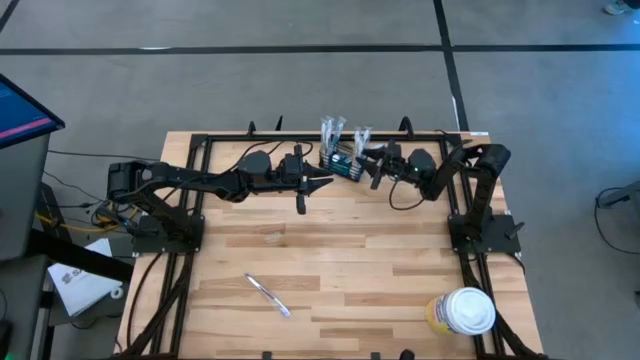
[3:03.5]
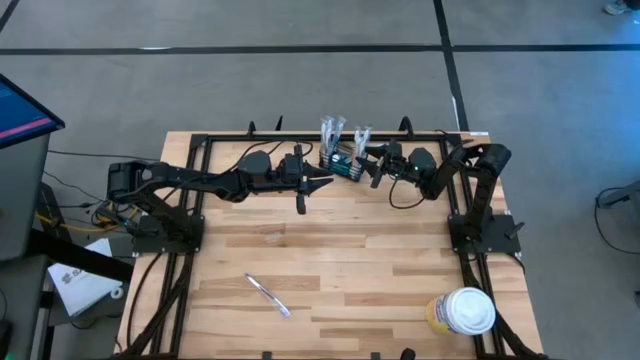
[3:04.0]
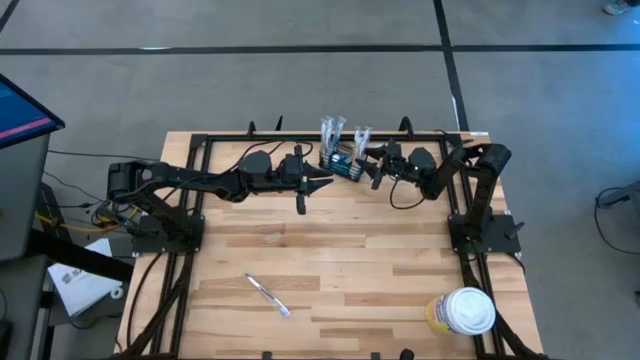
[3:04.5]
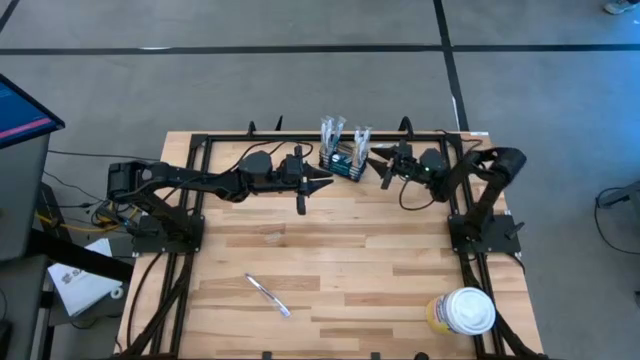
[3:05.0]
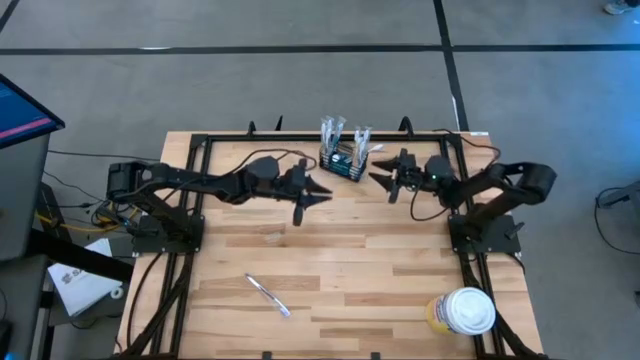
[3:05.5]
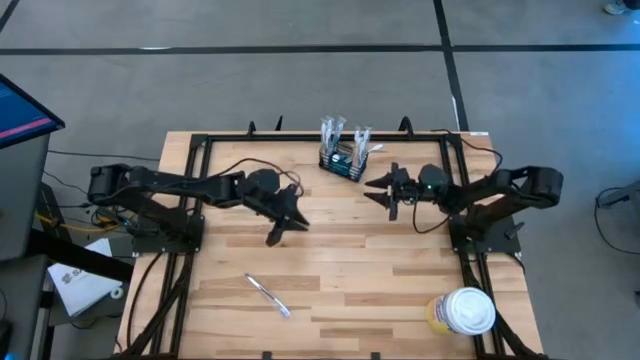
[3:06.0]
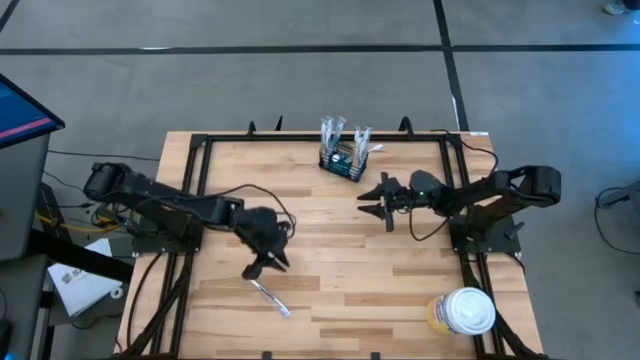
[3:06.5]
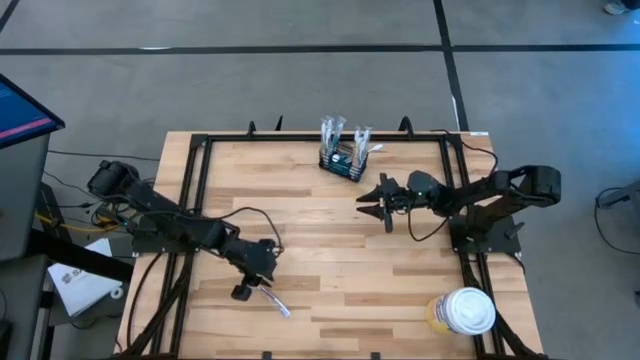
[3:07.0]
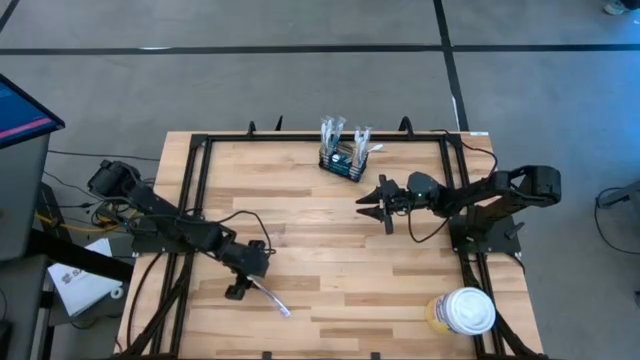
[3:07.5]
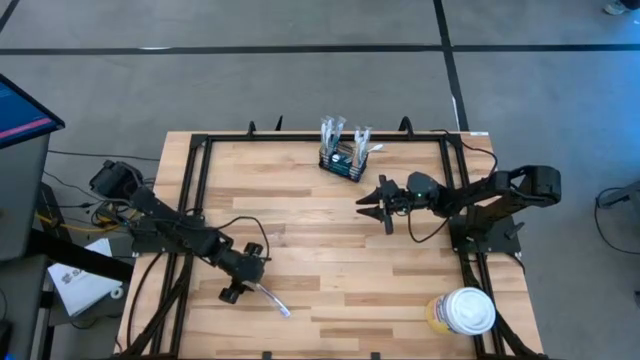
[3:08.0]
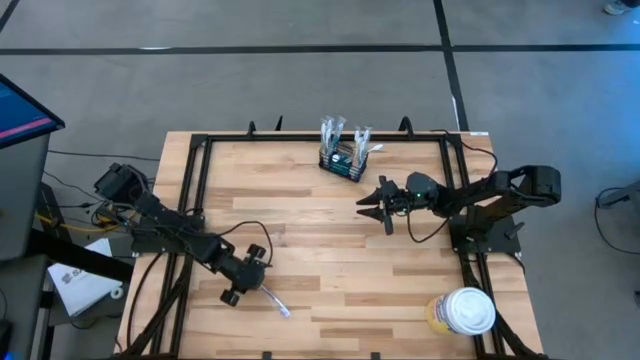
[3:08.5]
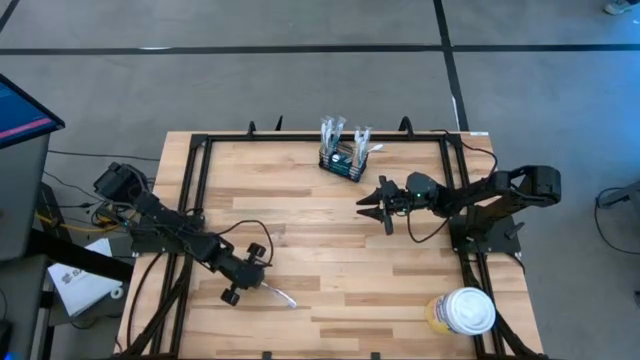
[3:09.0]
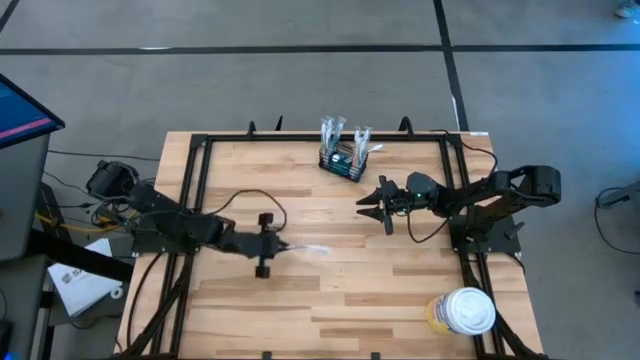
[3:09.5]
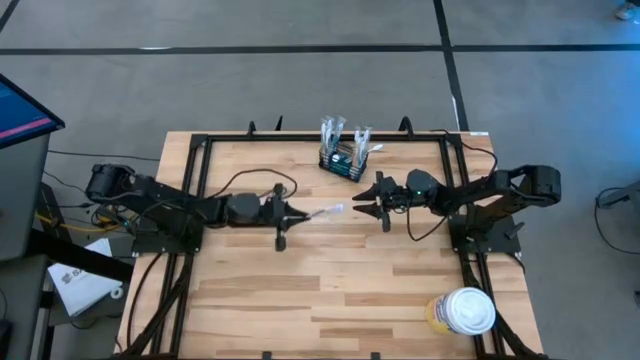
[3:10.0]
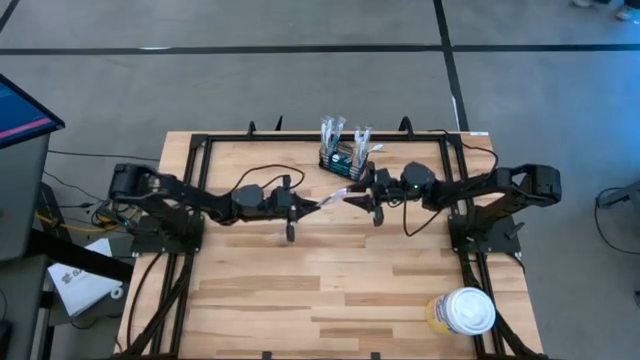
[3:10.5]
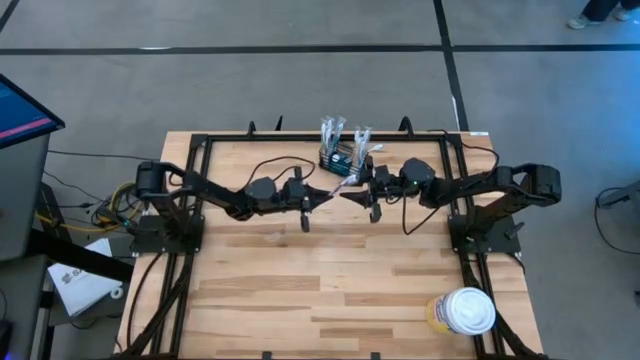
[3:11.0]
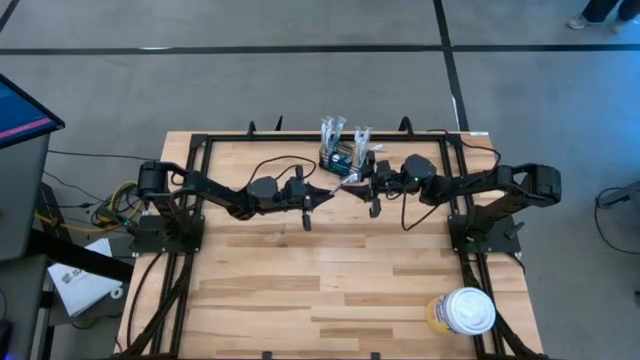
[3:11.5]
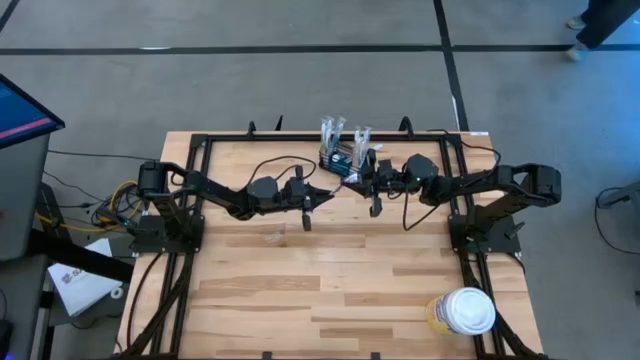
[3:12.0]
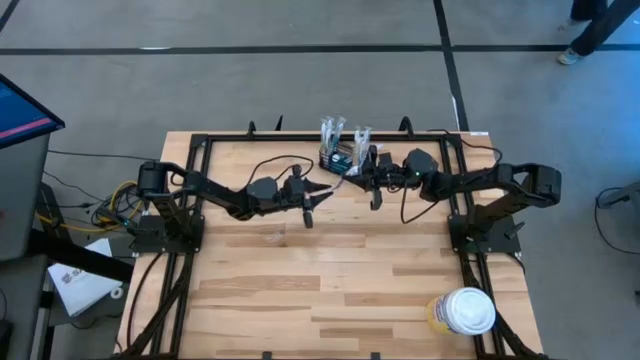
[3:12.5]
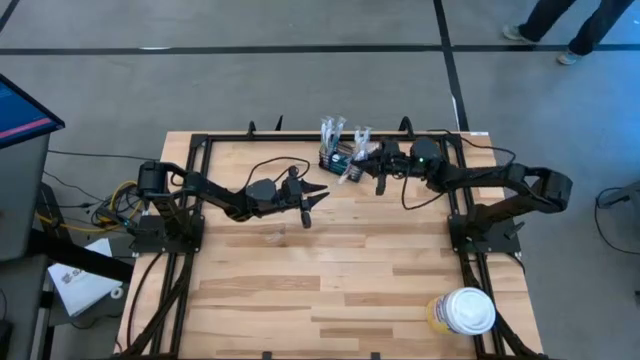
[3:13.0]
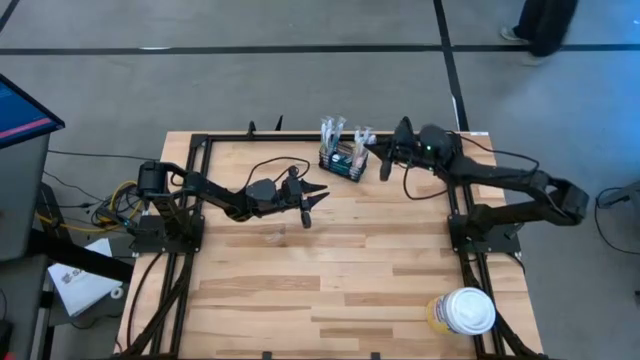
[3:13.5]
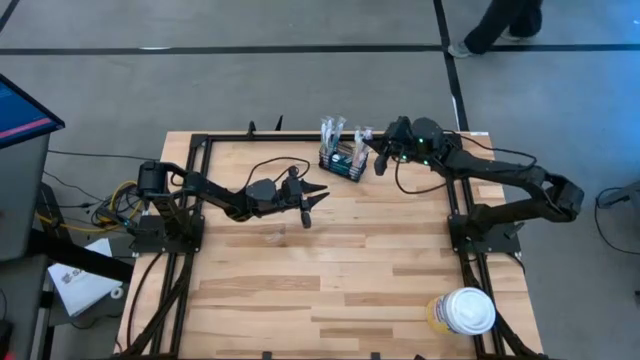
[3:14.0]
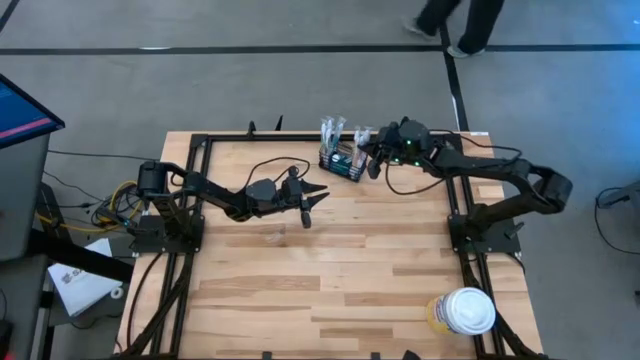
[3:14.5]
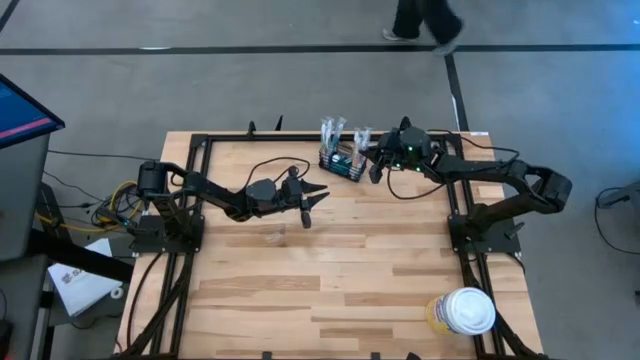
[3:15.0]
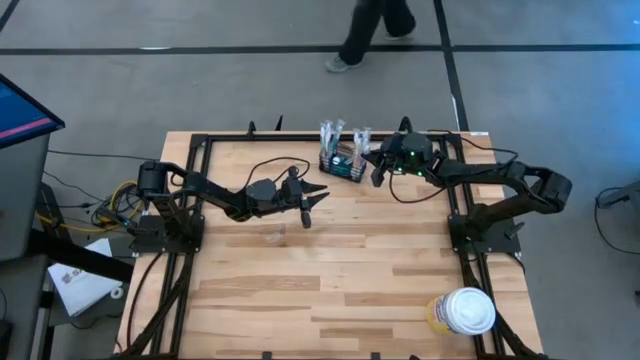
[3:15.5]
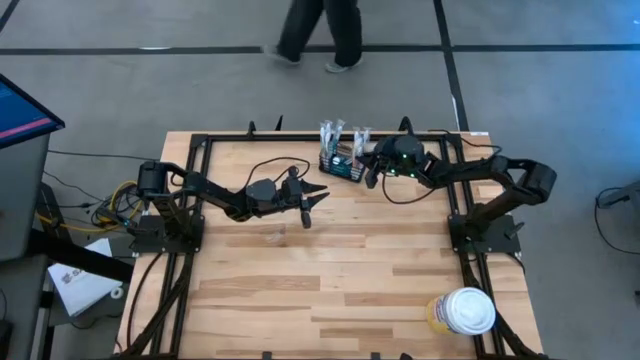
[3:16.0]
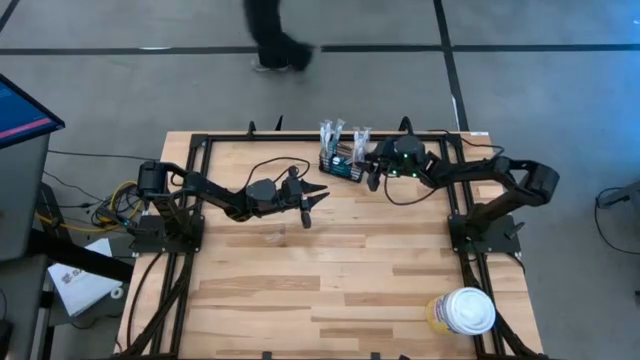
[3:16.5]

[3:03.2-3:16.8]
Task: Pick & Place toothbrushing station
Put the violet toothbrush into the mesh organizer

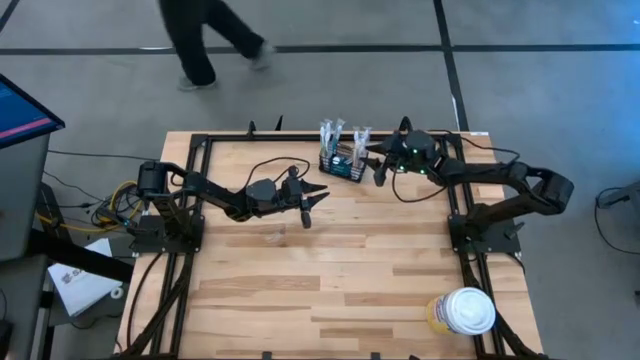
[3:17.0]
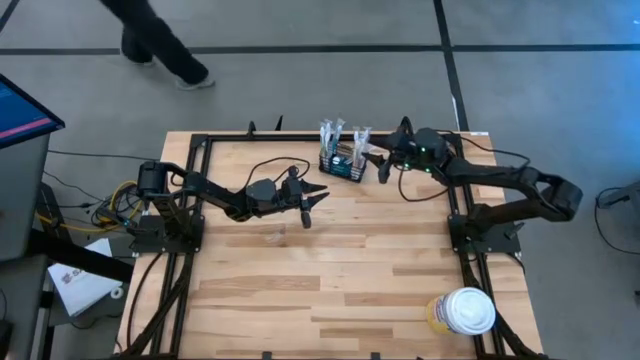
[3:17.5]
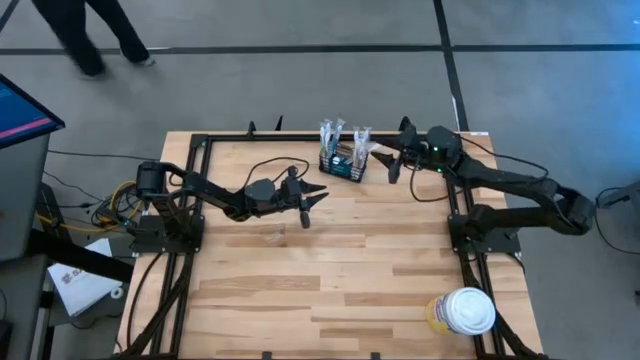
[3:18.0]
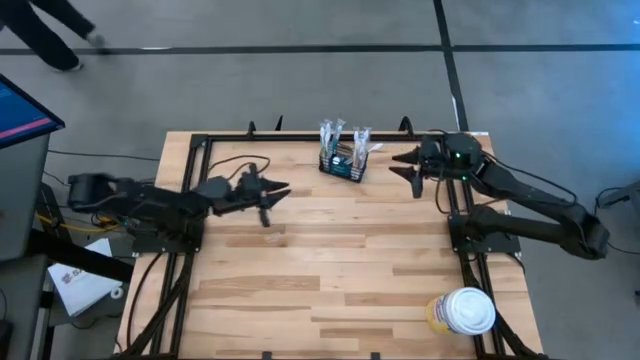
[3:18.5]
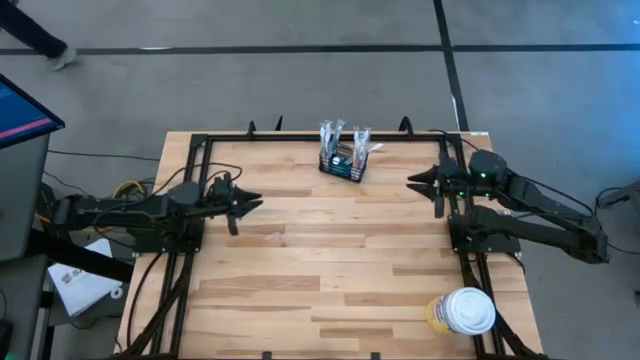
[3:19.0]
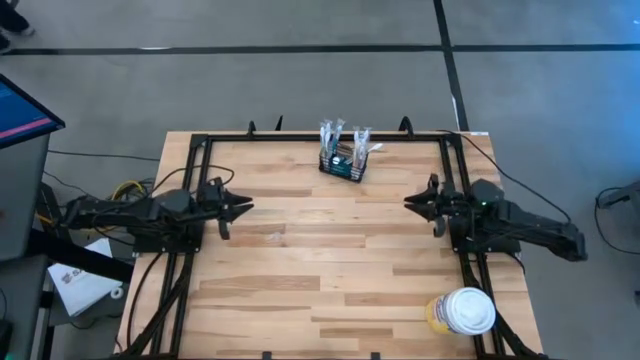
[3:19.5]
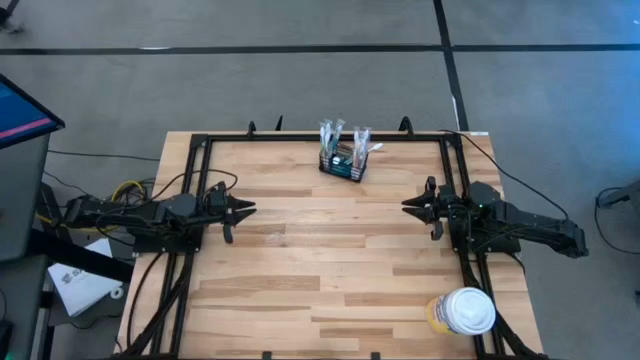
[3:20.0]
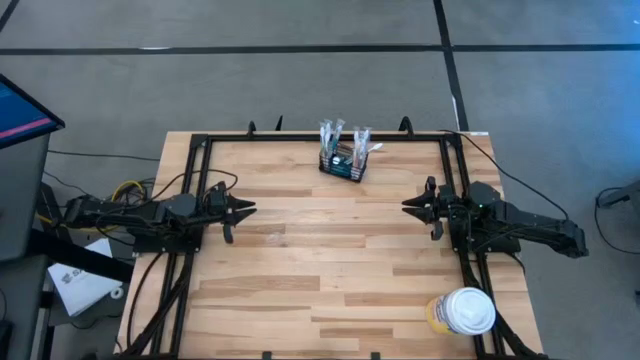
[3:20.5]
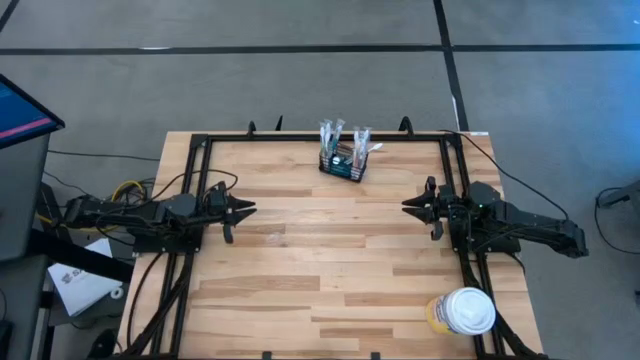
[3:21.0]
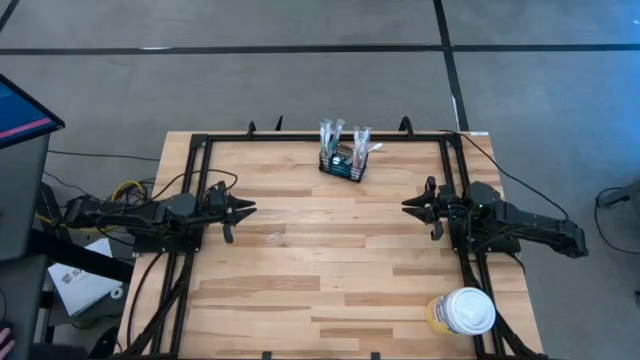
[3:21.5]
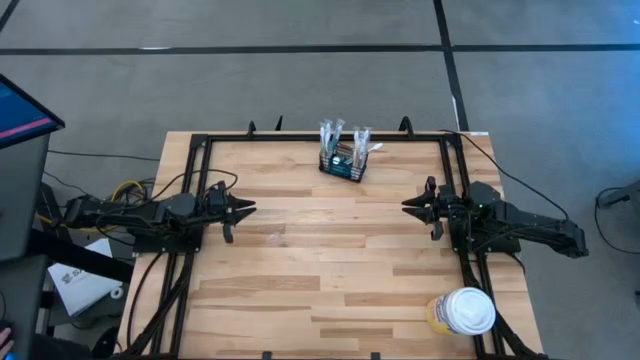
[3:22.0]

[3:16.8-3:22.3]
Return to Home Position
